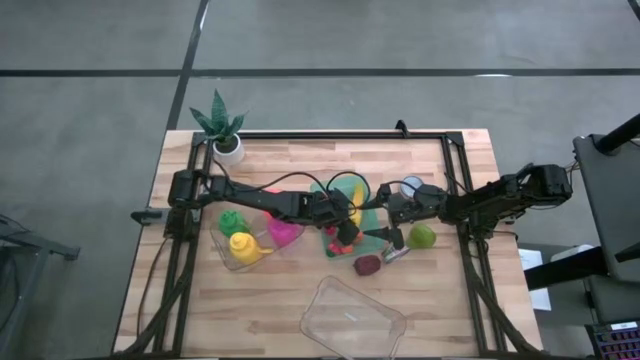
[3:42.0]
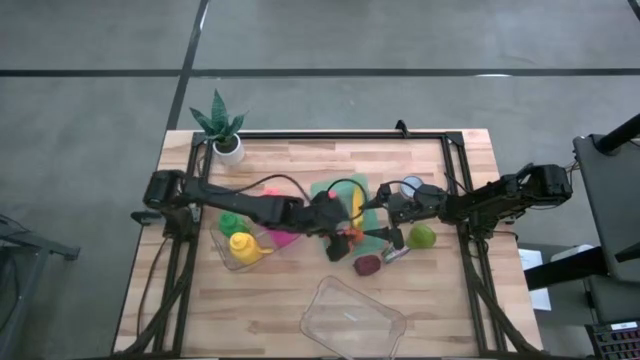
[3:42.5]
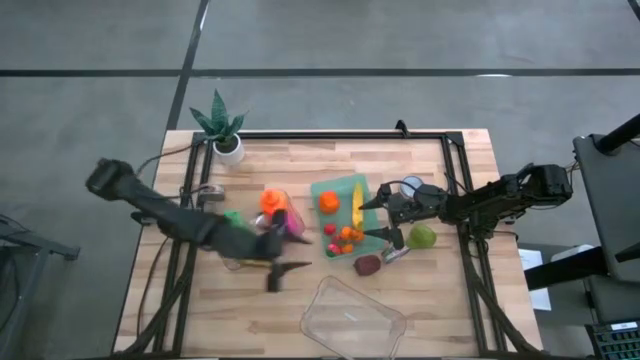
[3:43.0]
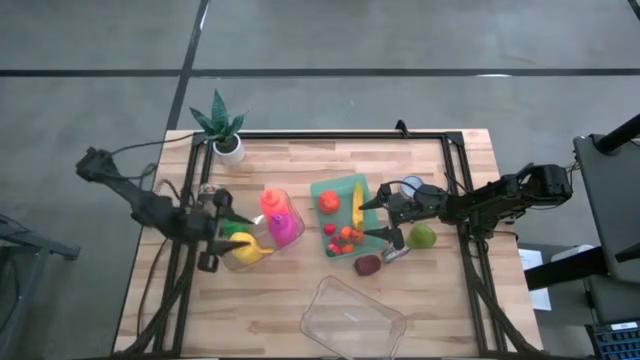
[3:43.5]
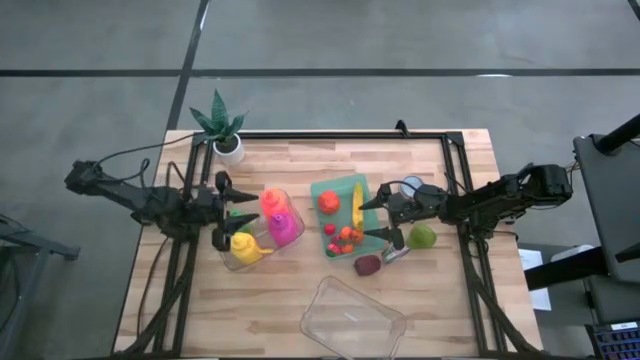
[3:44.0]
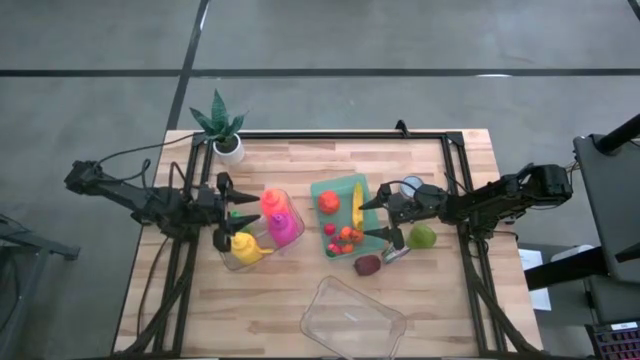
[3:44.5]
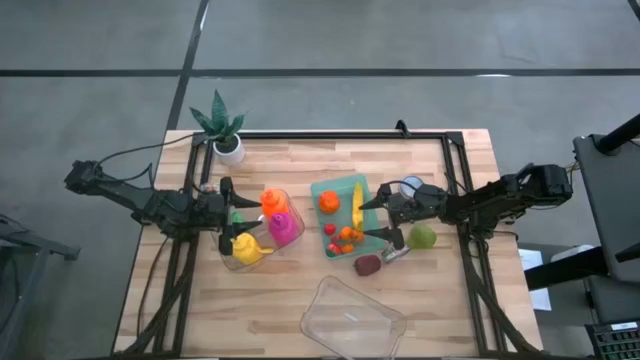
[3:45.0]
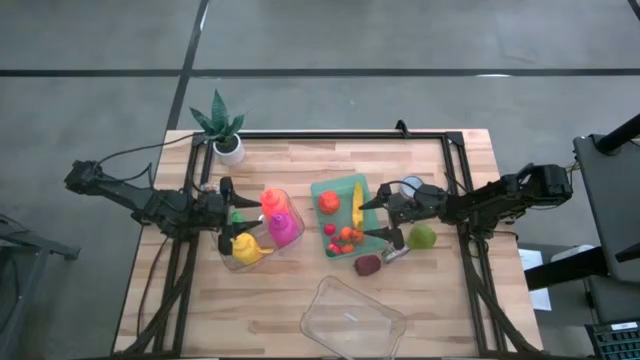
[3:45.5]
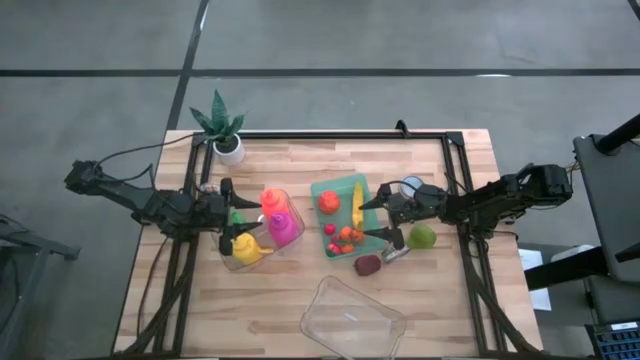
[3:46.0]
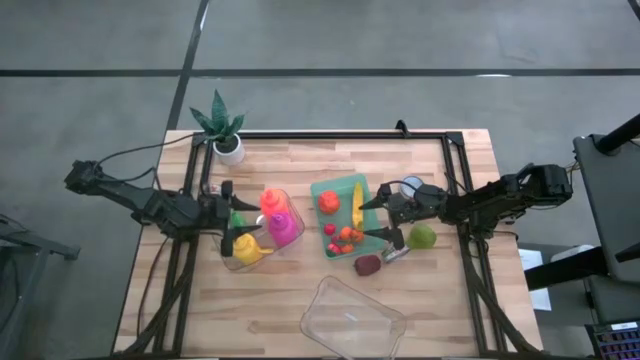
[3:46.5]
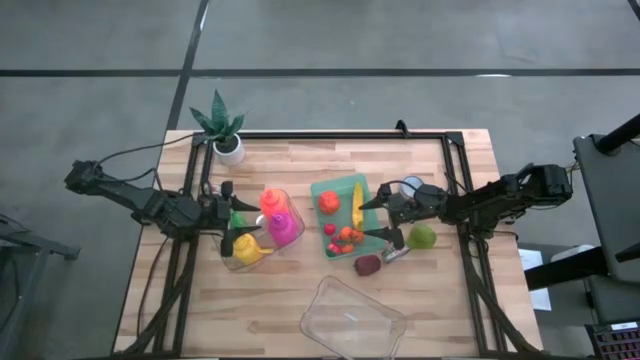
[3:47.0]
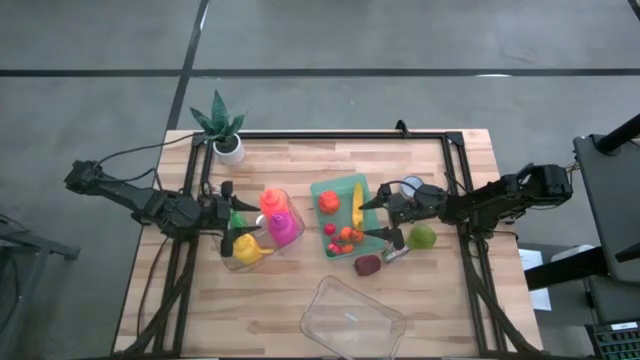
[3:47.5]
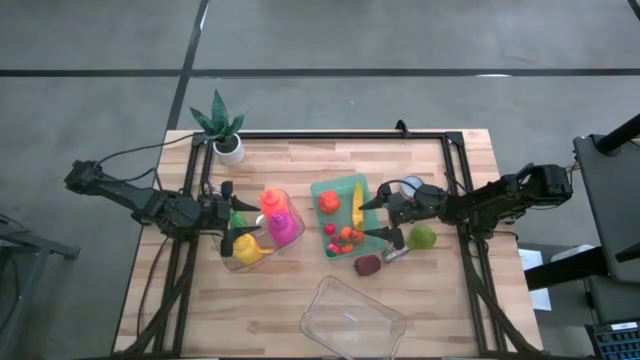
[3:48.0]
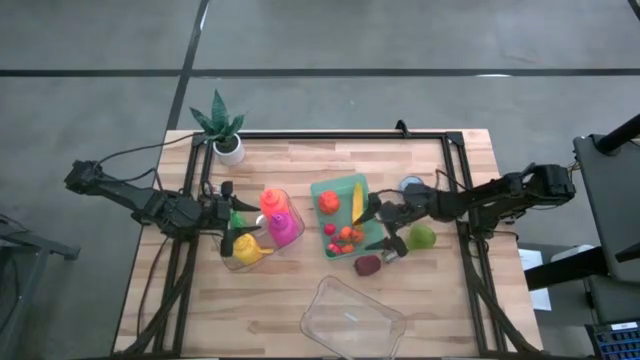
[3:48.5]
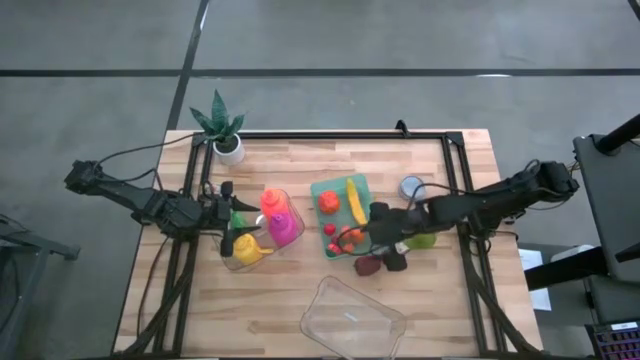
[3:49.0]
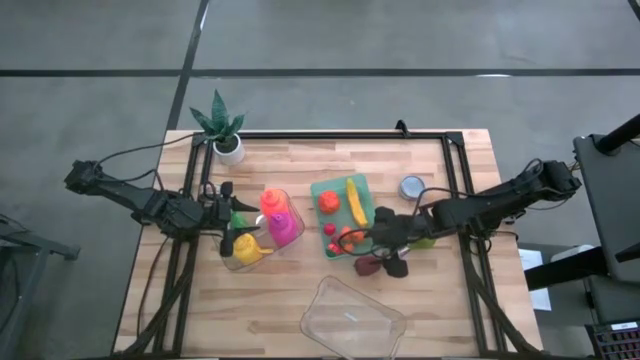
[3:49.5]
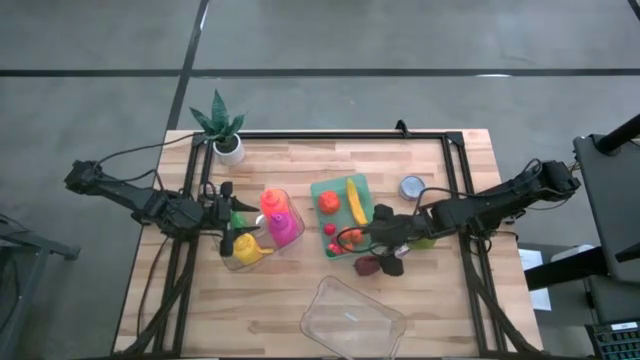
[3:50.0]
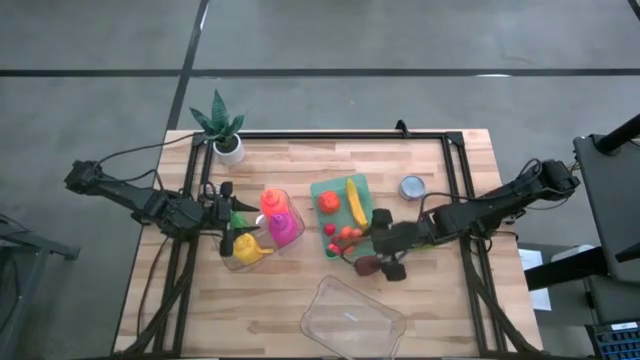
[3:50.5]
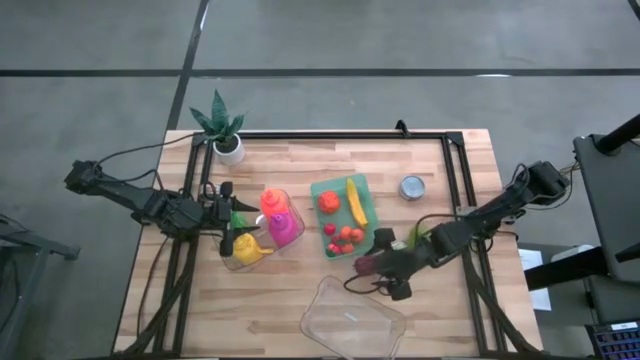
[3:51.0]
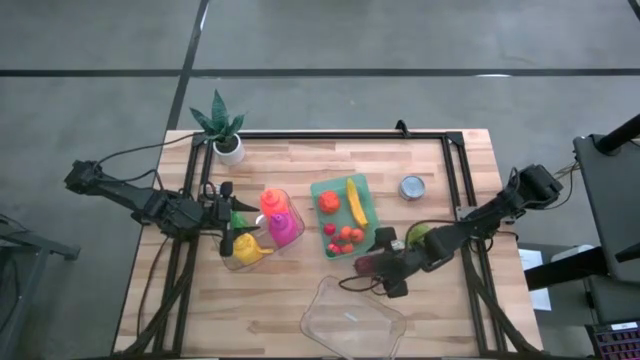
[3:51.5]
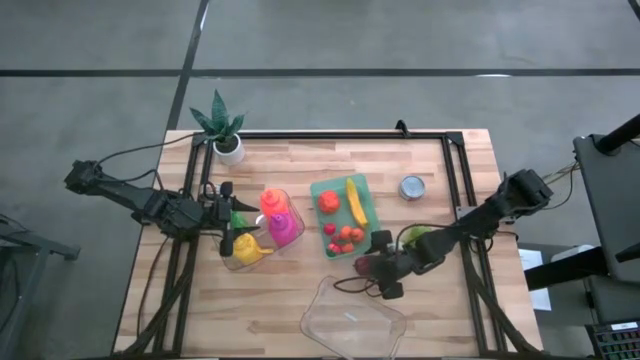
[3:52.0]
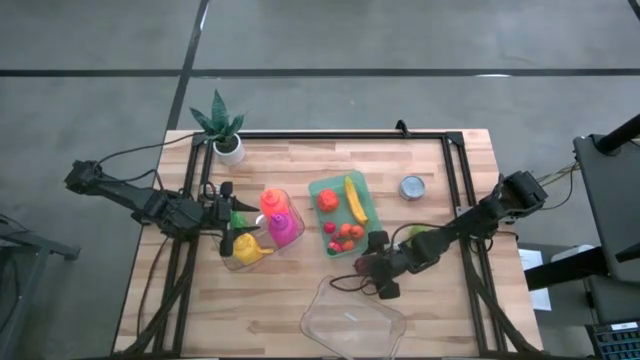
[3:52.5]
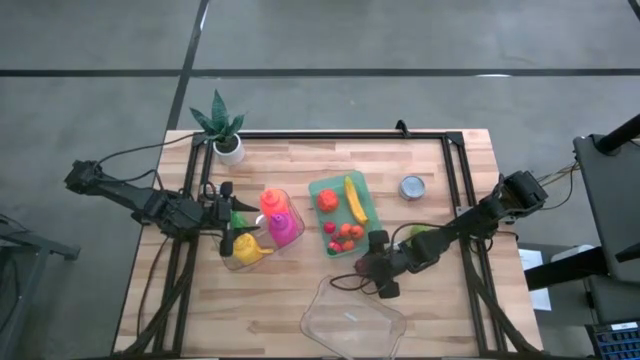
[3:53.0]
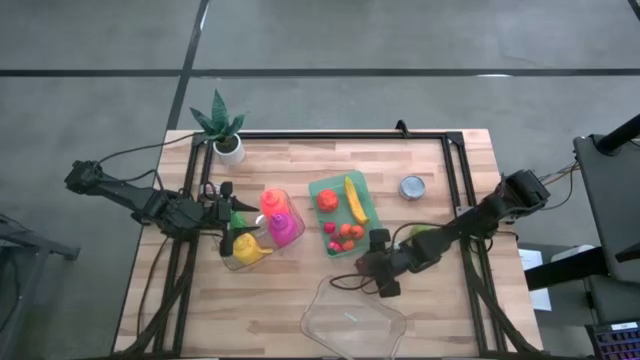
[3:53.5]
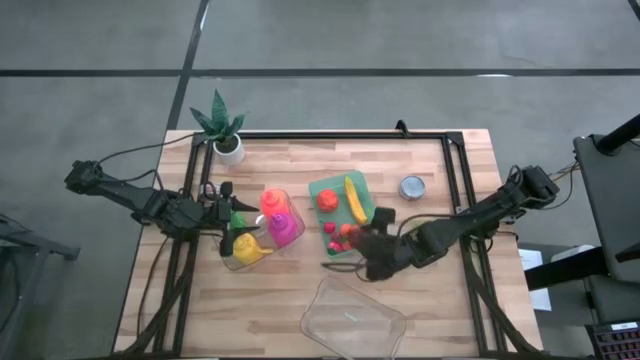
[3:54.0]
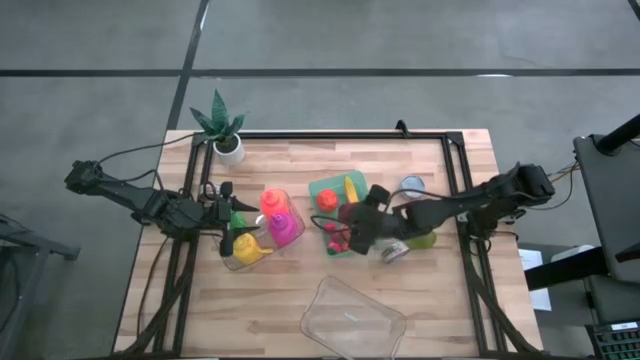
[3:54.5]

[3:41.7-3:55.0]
Task: Pick & Place Food Item
Put the red apple into the green bin

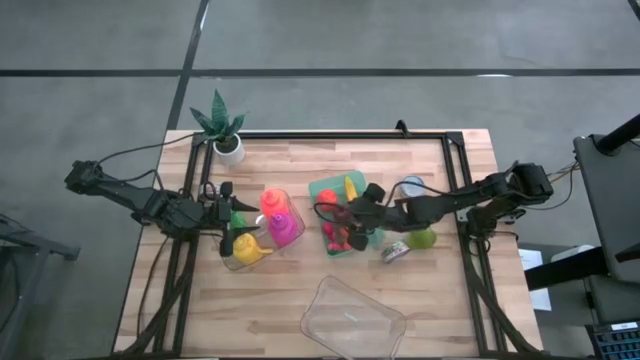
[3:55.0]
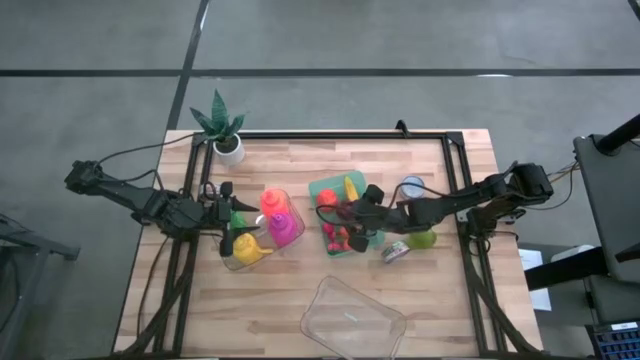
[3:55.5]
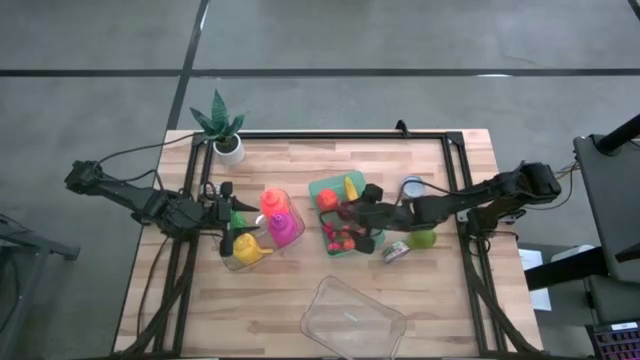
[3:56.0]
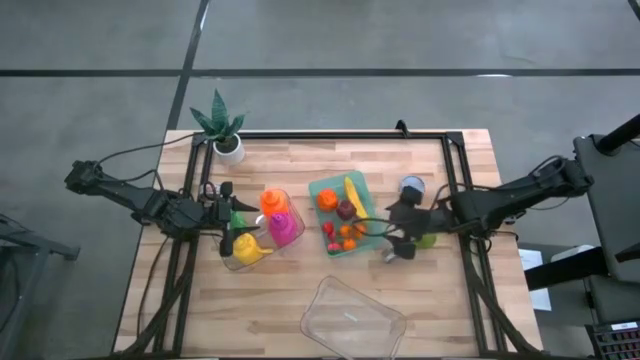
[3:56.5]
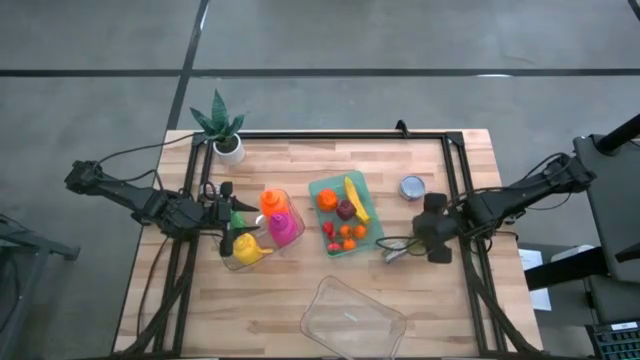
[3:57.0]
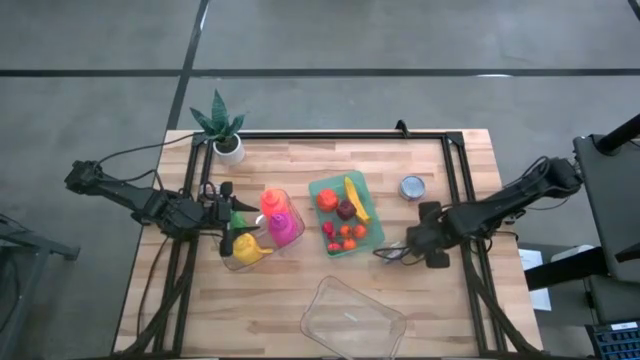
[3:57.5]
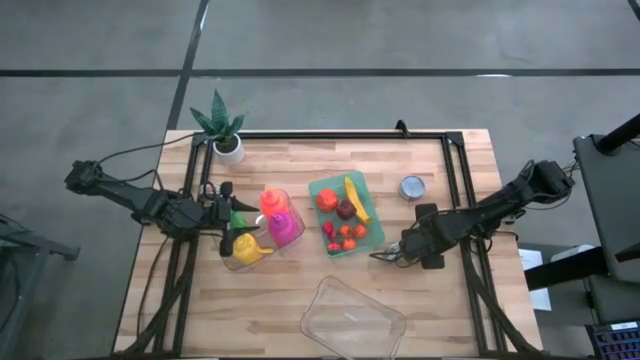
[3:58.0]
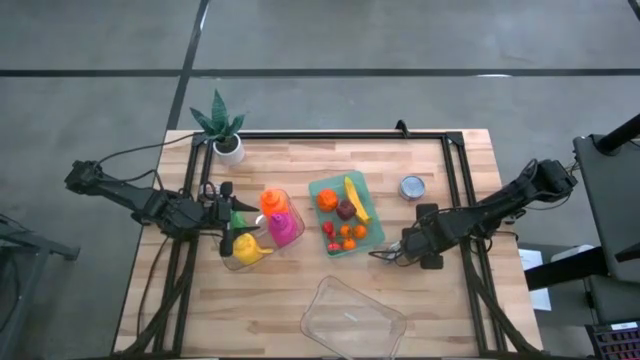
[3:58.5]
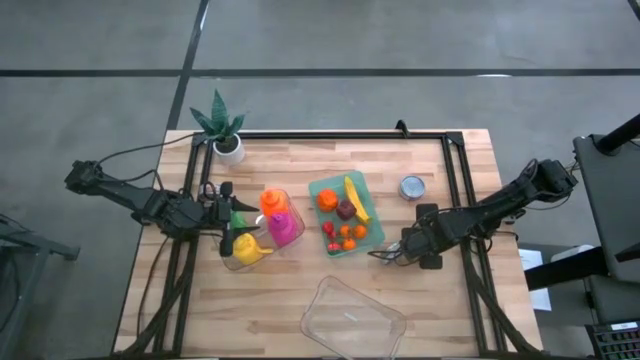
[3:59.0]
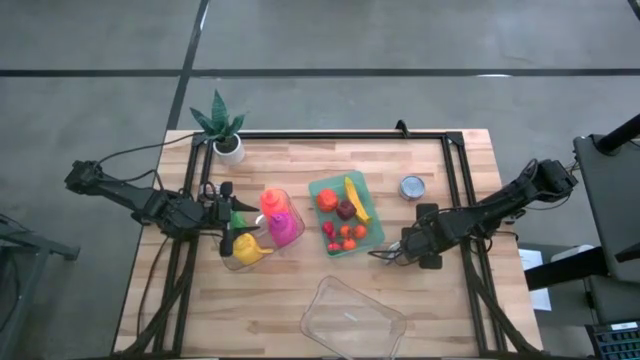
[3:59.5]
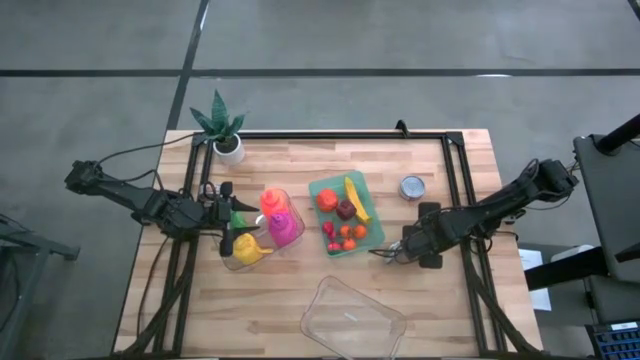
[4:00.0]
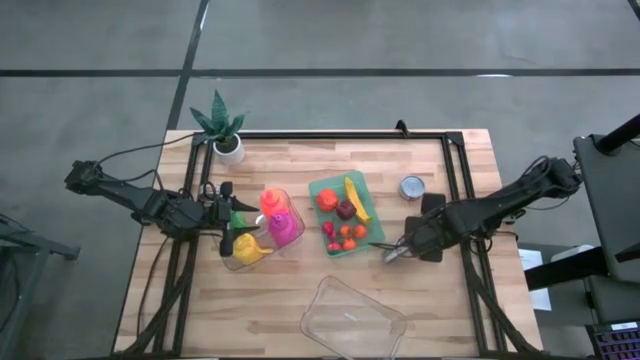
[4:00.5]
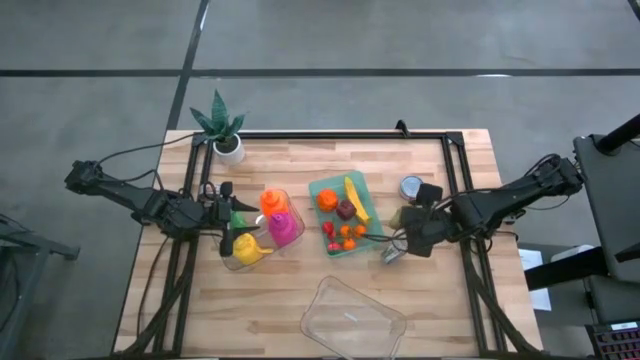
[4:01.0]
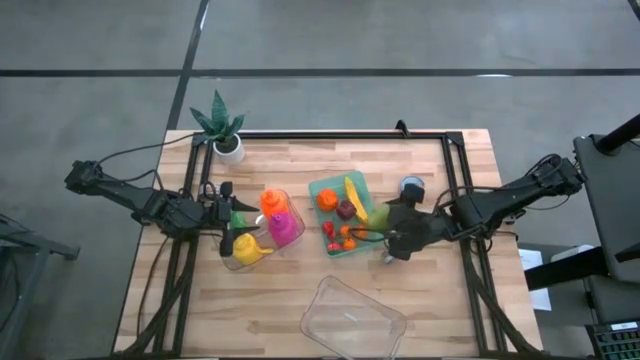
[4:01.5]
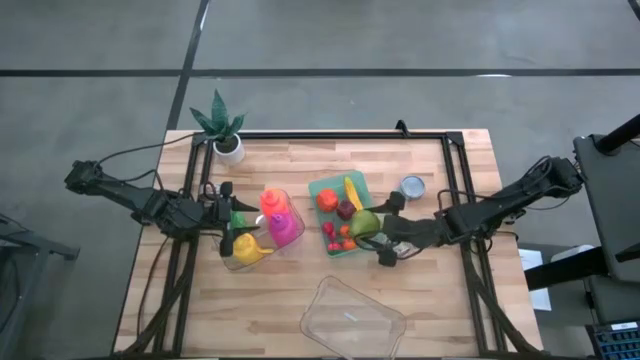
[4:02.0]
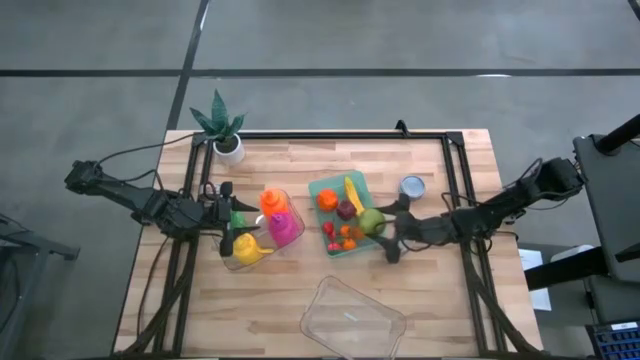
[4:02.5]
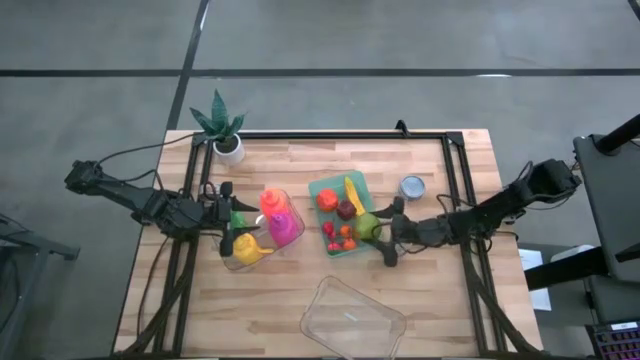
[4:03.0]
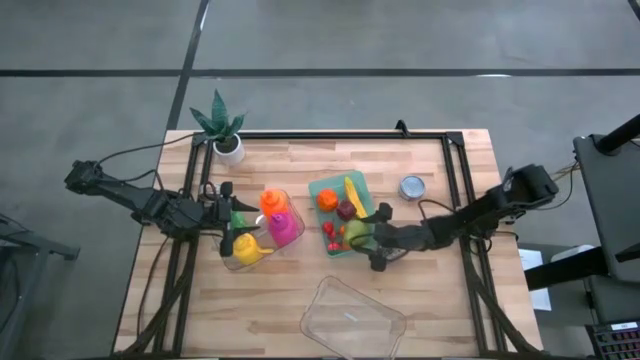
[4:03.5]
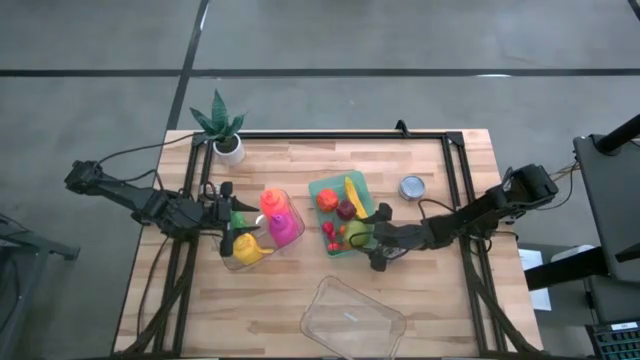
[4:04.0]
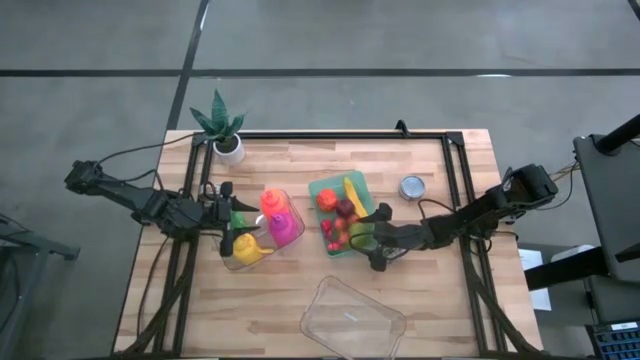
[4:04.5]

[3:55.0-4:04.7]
Put the green pear into the green bin
